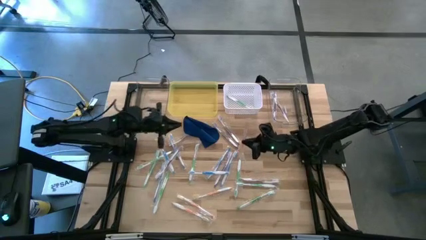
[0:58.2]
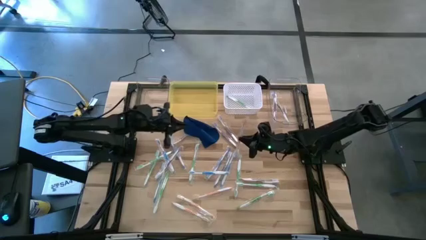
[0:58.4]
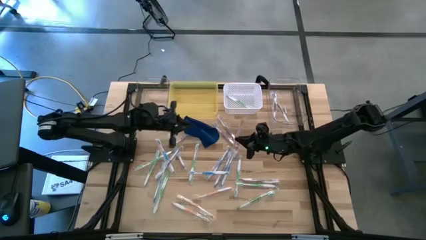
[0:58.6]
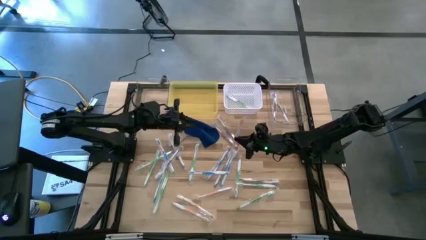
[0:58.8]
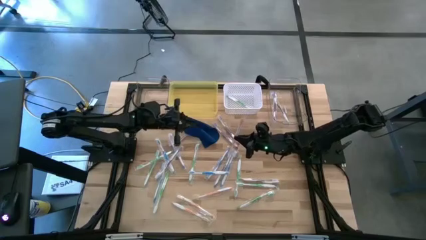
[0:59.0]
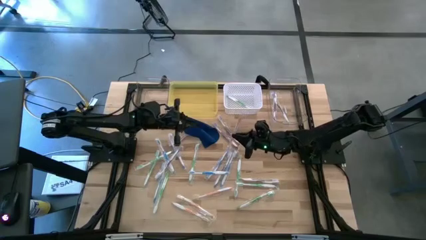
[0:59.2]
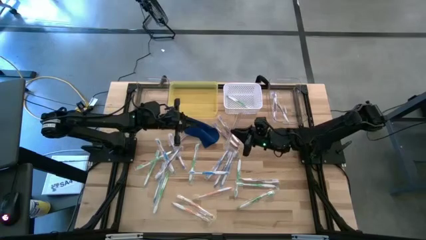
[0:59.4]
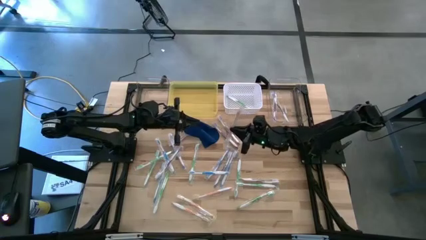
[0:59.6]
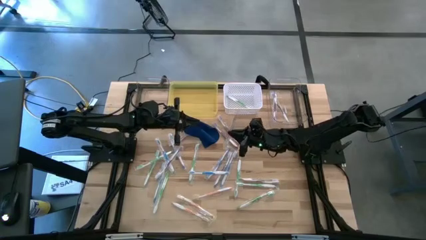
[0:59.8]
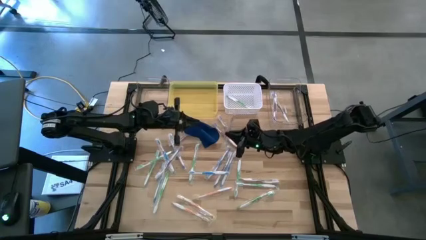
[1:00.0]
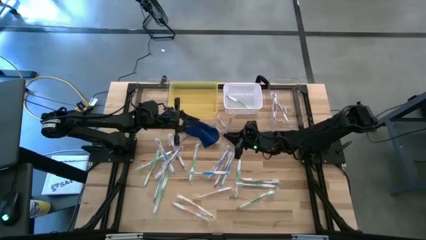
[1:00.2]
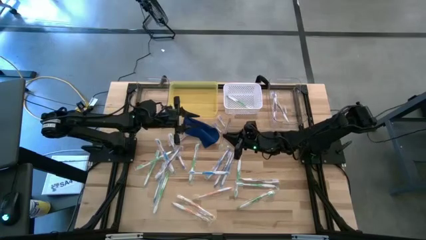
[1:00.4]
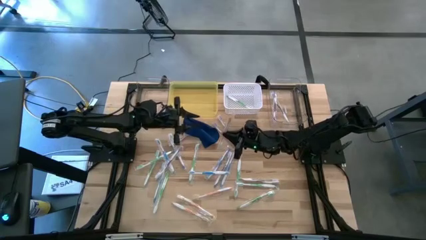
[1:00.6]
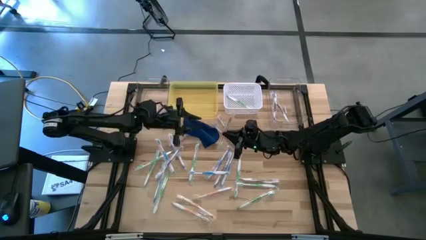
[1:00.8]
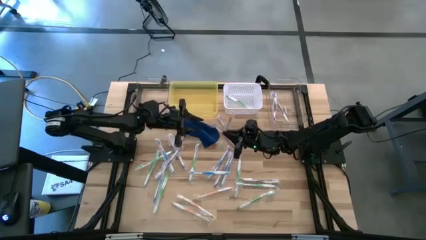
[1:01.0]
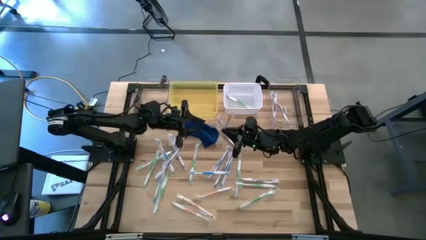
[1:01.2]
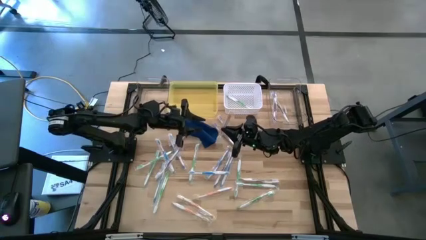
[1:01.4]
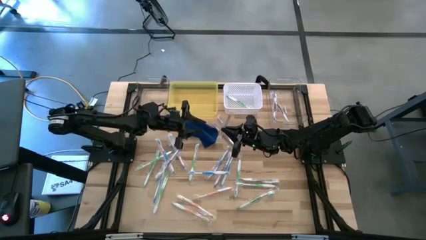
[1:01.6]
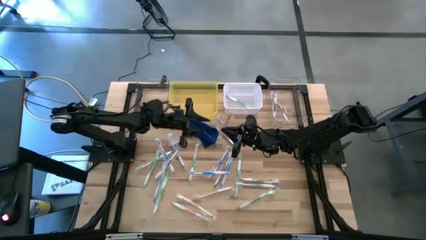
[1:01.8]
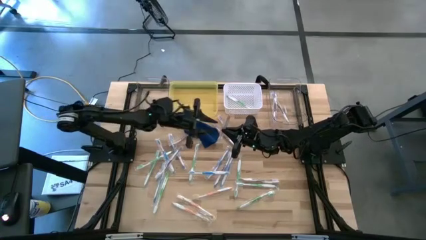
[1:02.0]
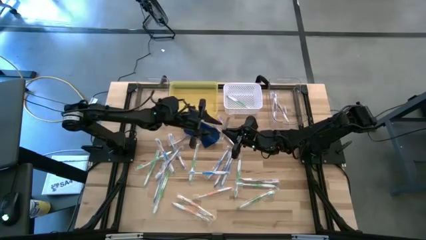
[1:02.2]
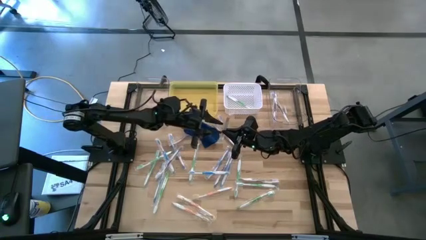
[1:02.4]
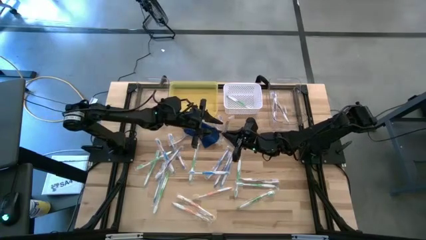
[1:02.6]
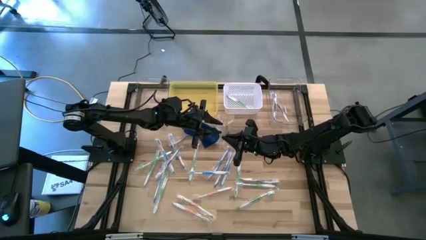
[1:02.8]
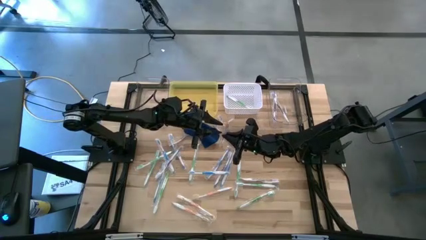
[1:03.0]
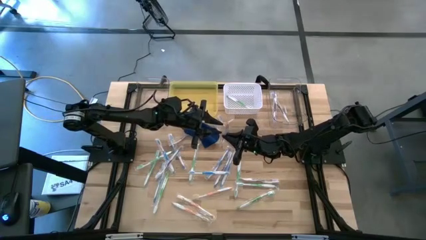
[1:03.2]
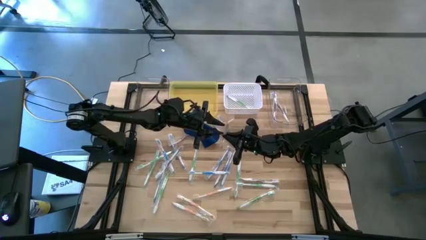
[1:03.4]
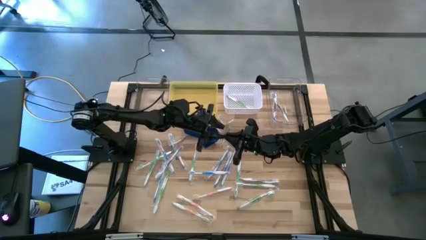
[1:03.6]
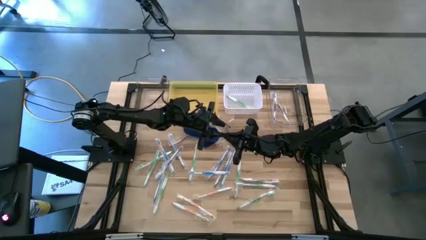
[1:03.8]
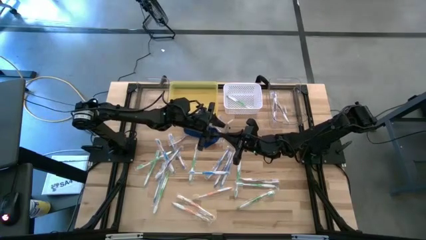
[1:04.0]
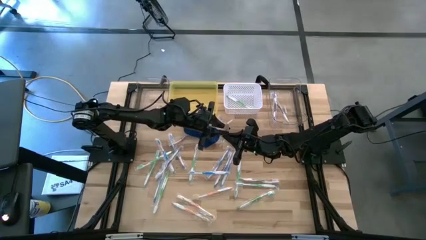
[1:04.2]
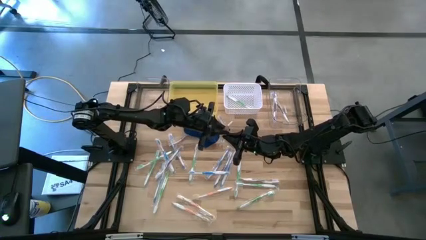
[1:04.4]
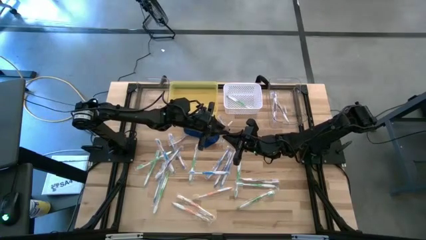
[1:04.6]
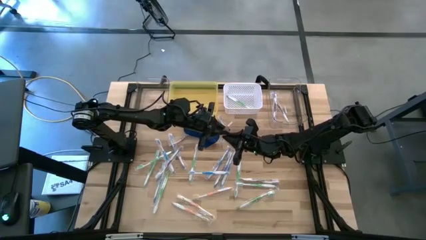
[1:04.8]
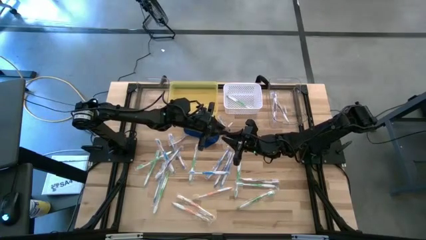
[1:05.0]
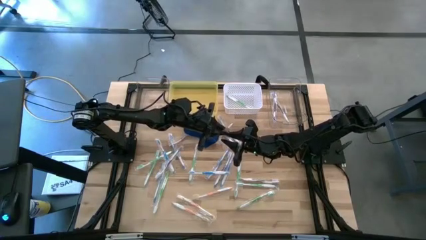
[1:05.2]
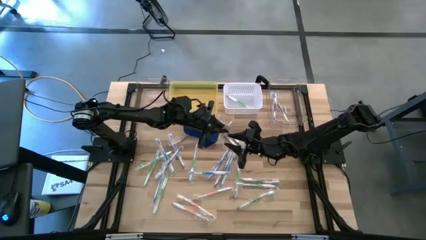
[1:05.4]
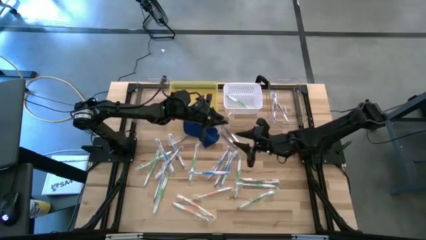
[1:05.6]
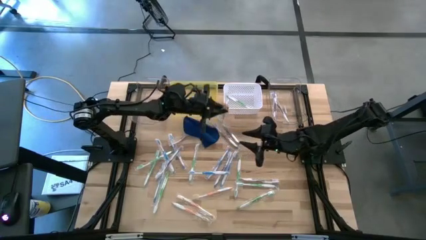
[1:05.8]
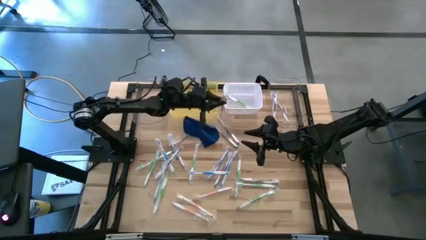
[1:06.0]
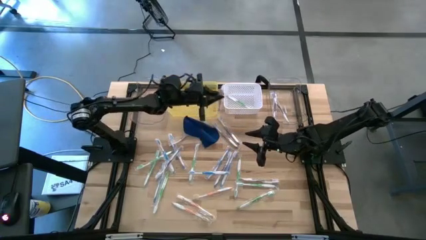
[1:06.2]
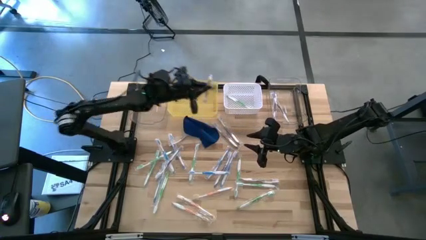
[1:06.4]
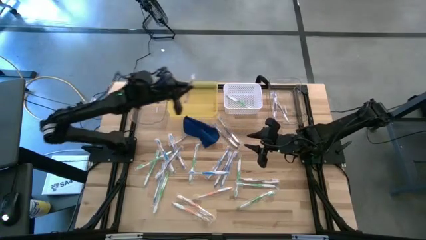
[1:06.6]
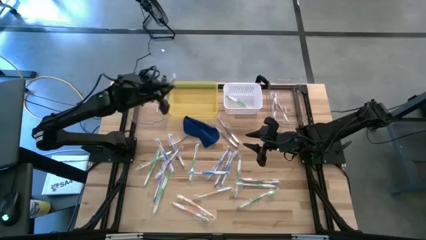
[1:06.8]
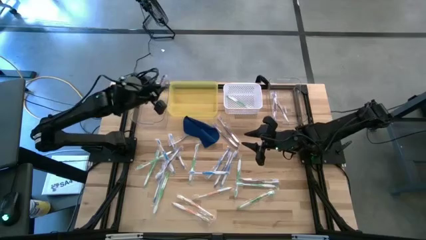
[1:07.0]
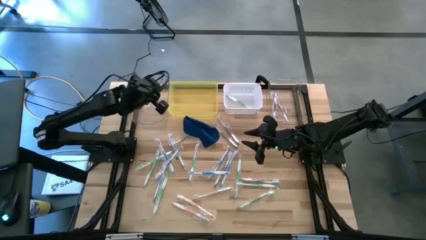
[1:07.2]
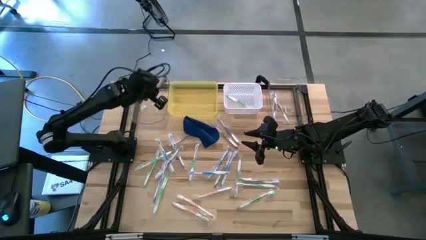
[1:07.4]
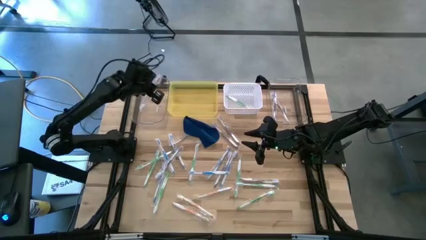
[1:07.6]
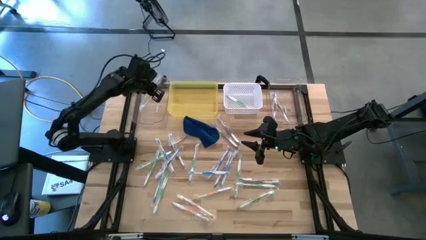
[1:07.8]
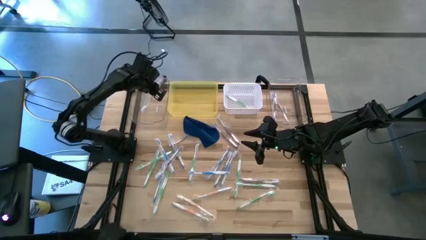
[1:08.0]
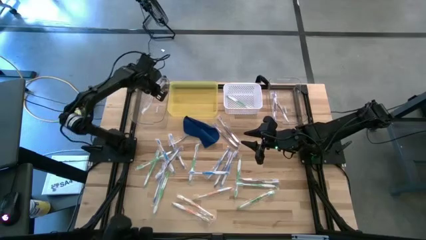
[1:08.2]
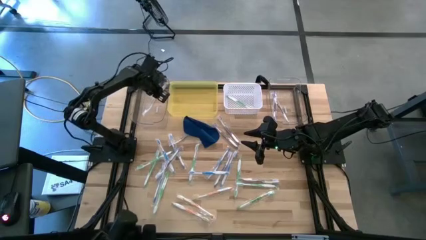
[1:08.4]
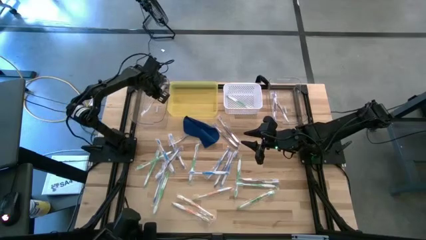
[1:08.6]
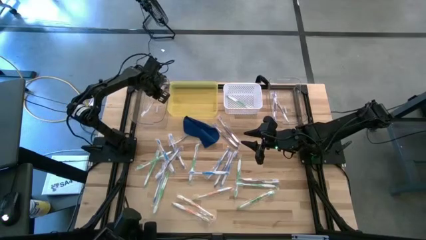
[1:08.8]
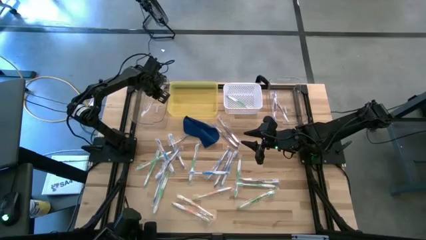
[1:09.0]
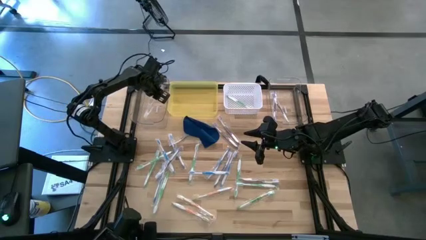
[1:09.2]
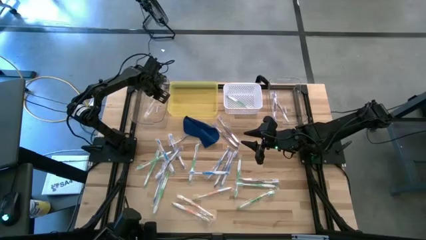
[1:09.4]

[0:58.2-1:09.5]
Task: Pick & Place Toothbrushes
Put the orange toothbrush into left transparent bin
